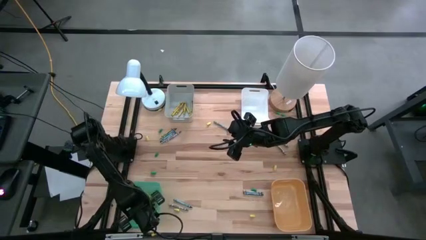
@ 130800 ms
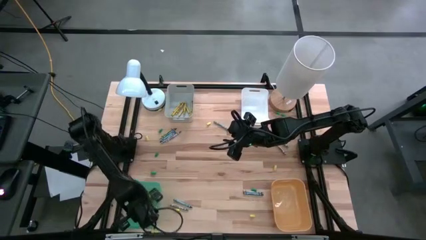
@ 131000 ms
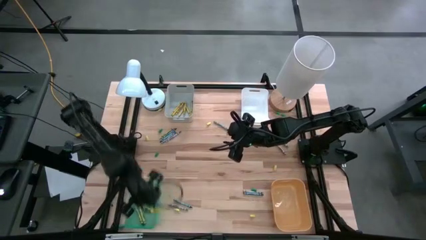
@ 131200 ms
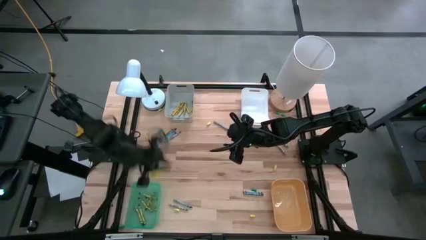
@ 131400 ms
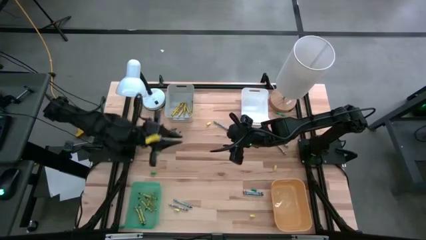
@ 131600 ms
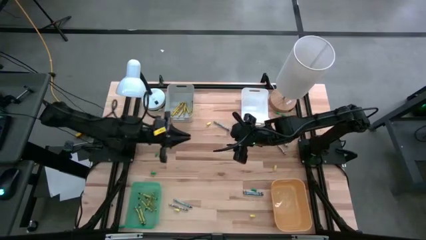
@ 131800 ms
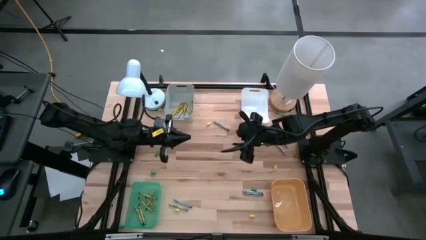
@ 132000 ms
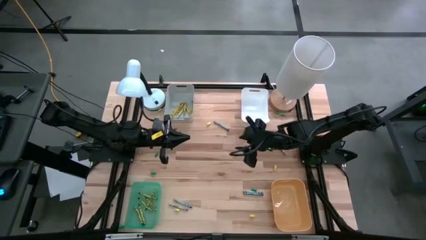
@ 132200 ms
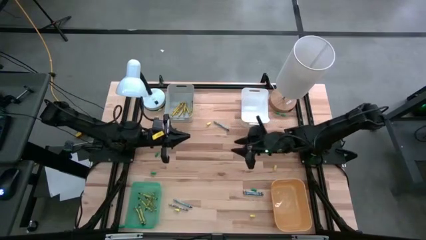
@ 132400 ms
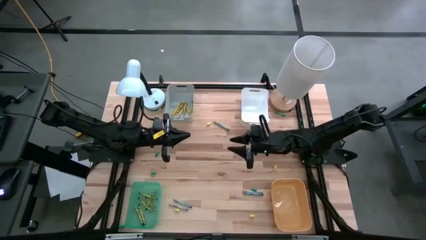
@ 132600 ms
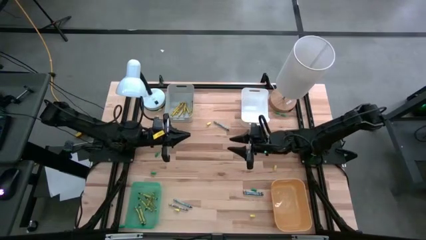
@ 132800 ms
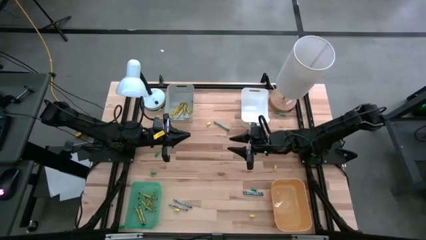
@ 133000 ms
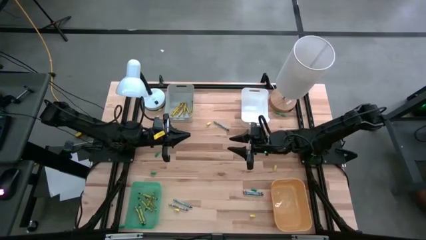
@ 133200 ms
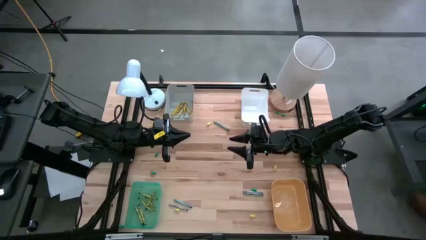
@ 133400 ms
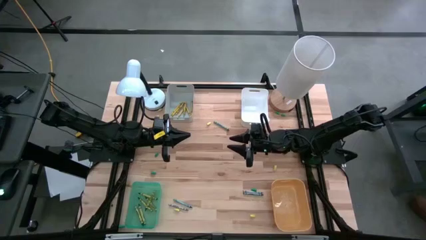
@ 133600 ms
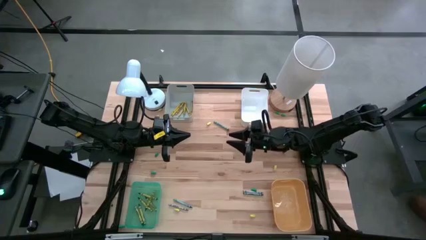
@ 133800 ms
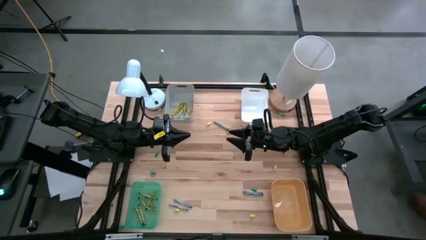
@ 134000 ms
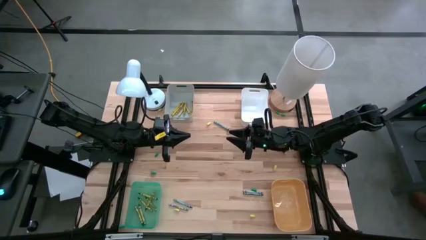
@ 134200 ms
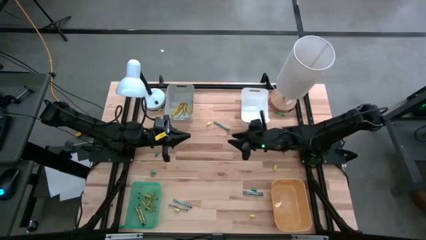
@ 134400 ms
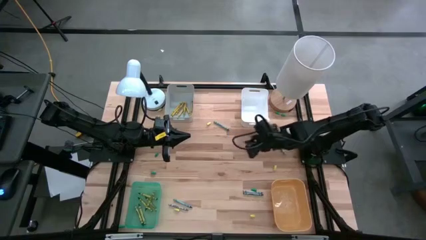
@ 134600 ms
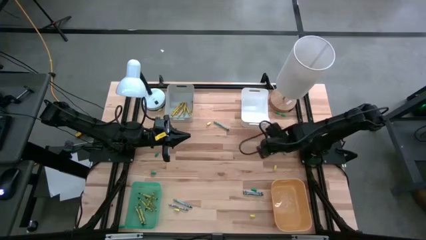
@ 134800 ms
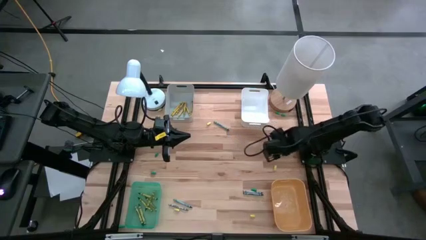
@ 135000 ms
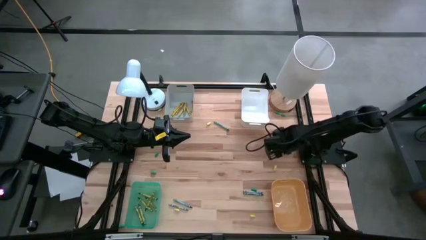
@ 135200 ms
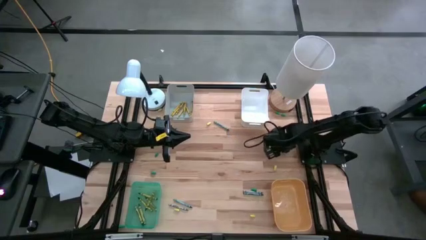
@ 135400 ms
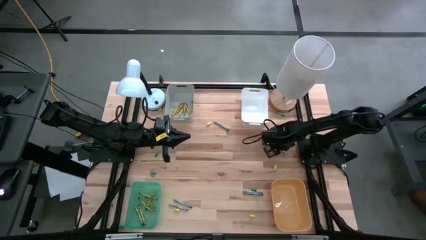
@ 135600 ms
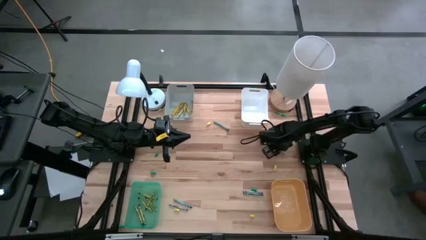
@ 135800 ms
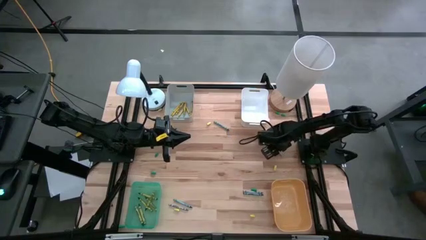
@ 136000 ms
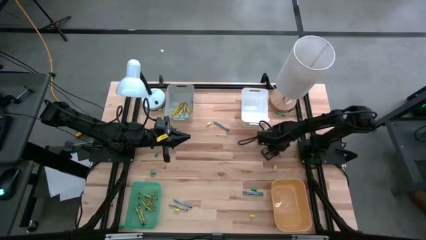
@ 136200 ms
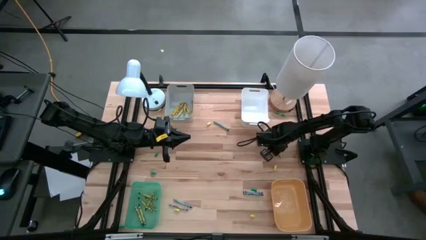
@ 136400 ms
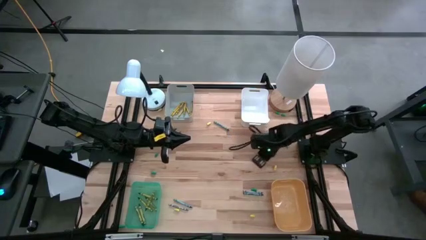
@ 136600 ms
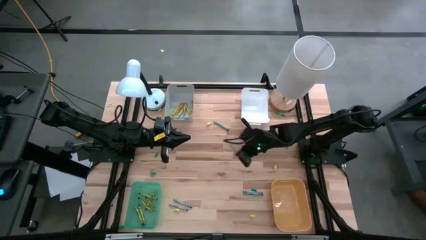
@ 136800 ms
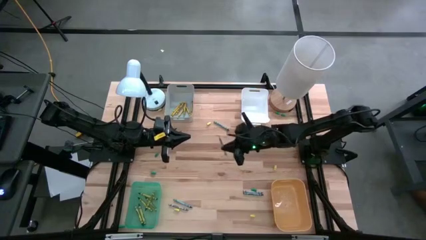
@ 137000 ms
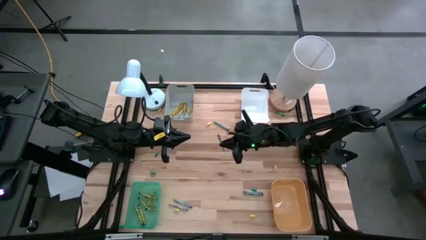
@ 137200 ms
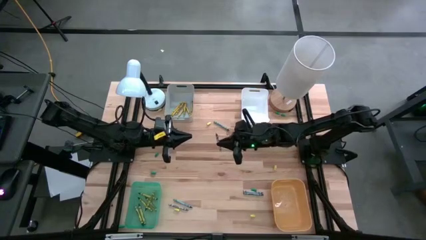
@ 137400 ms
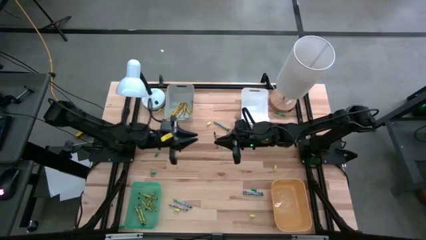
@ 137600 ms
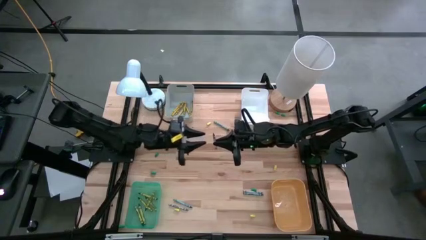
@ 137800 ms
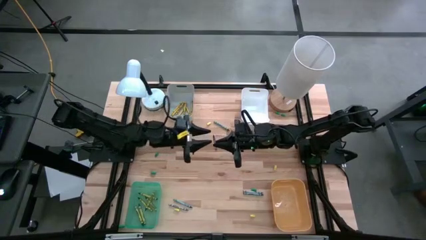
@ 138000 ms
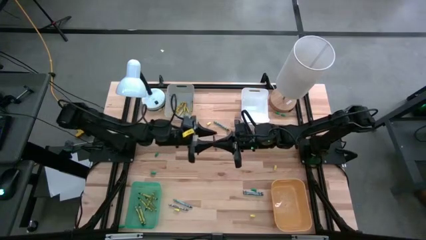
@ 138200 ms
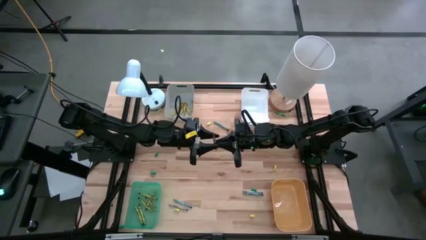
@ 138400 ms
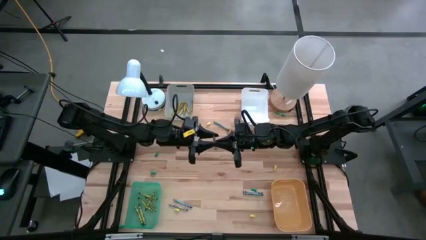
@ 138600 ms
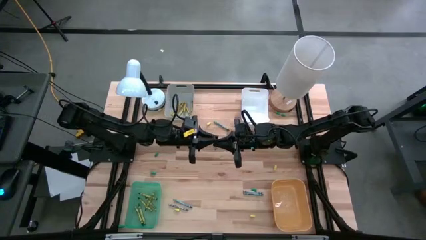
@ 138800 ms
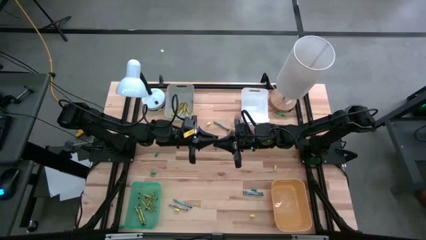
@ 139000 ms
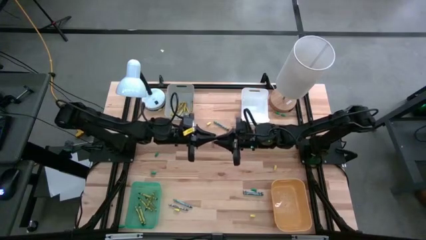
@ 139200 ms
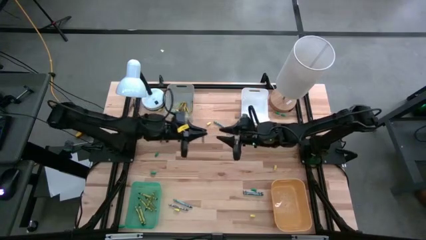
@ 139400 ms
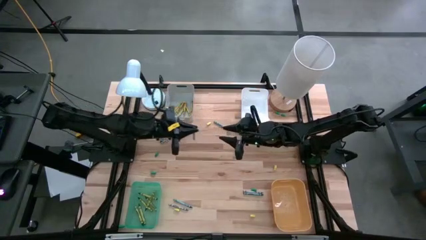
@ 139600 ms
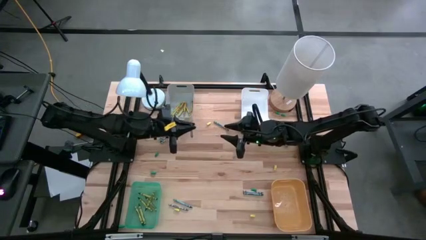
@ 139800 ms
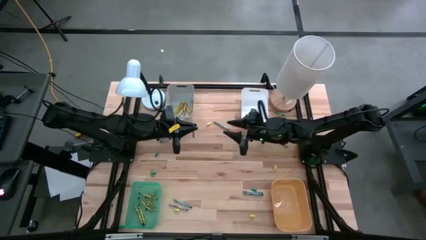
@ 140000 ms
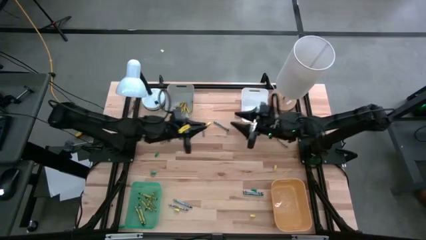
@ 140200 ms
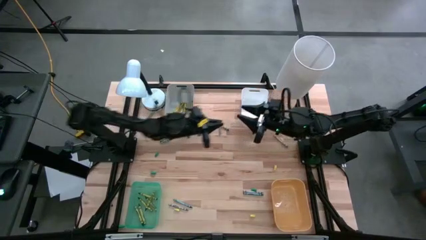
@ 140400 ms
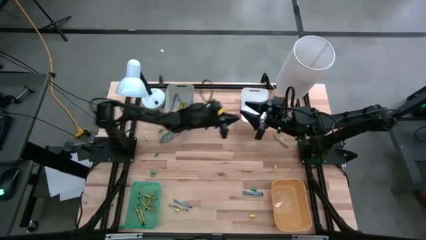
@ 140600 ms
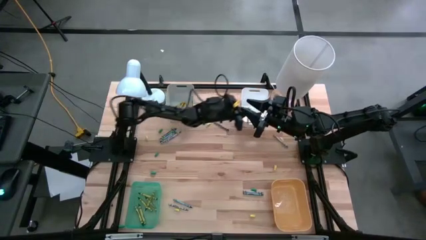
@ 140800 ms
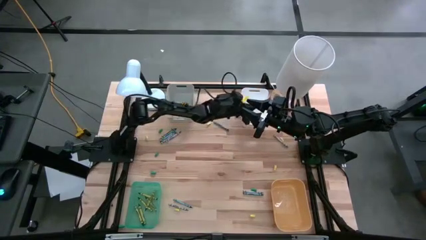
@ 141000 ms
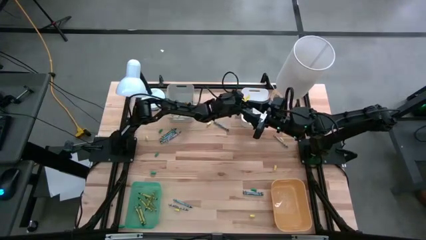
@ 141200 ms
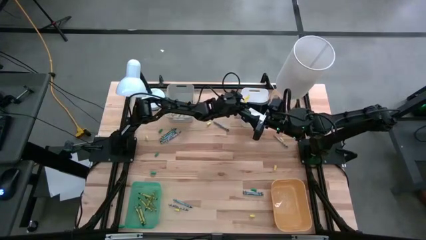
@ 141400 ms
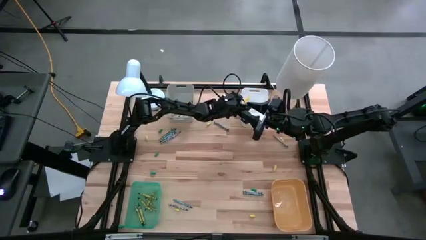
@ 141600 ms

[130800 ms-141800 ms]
Task: Sort crayons
Put the gray crayon into the white bin

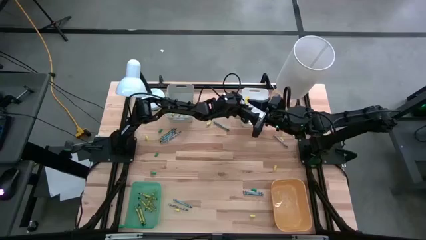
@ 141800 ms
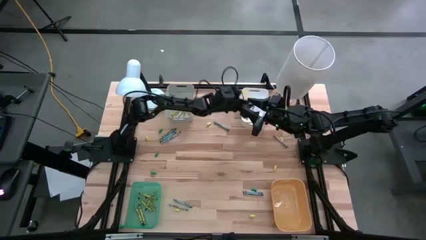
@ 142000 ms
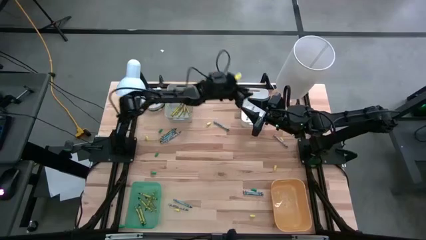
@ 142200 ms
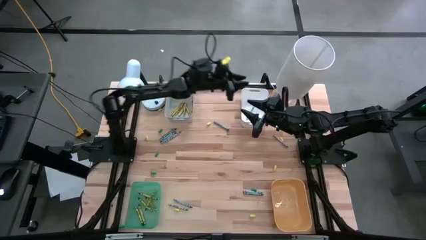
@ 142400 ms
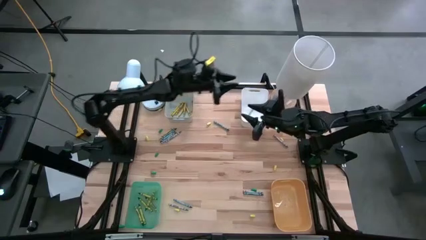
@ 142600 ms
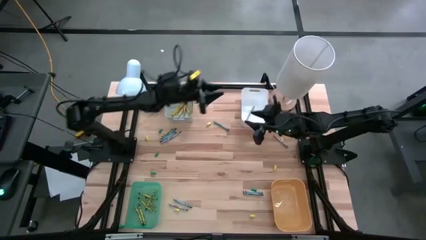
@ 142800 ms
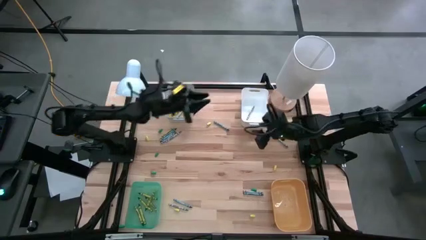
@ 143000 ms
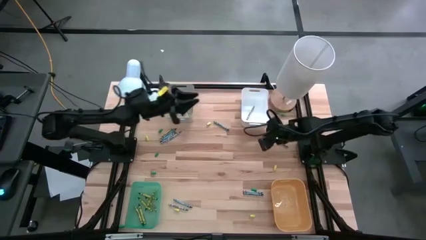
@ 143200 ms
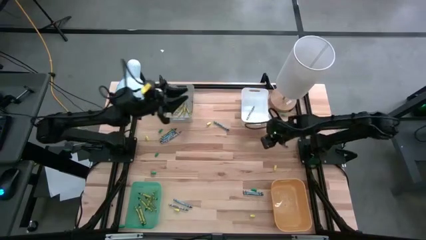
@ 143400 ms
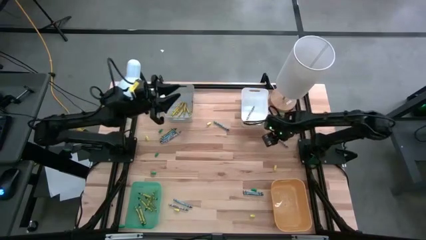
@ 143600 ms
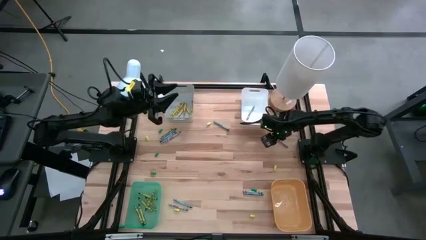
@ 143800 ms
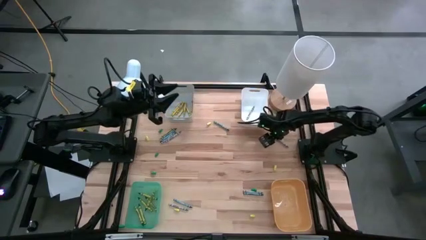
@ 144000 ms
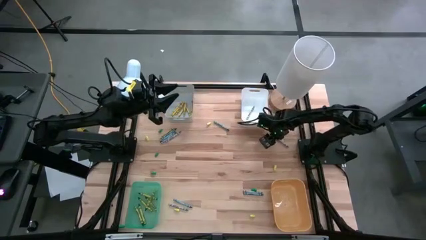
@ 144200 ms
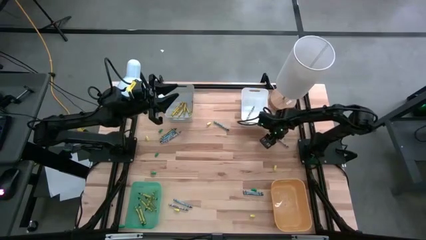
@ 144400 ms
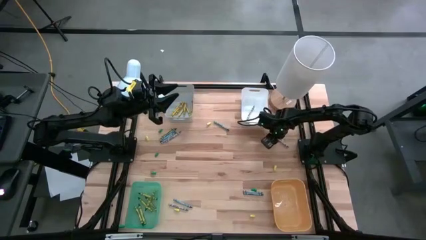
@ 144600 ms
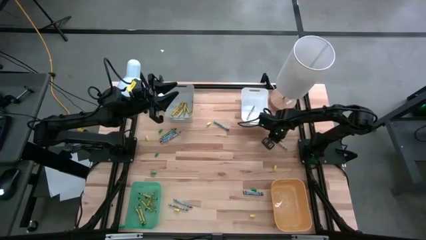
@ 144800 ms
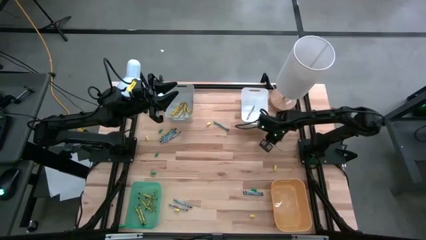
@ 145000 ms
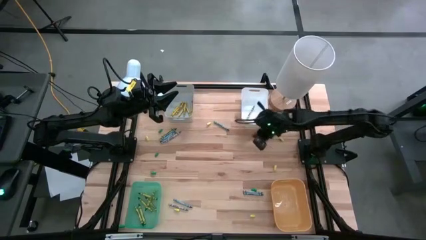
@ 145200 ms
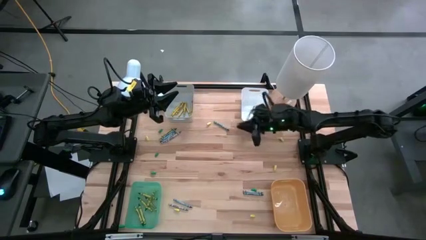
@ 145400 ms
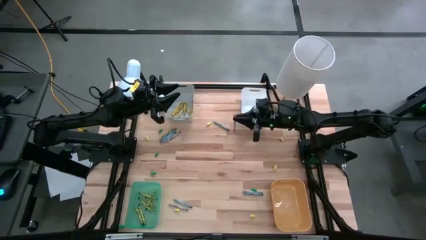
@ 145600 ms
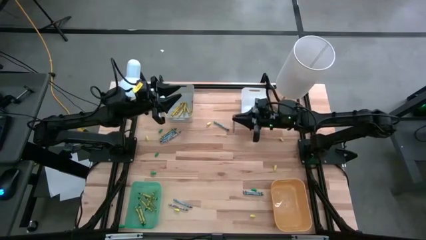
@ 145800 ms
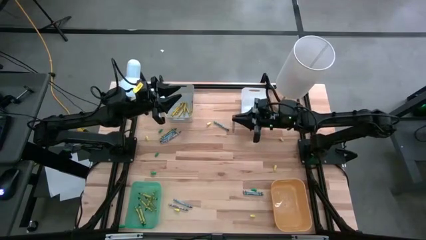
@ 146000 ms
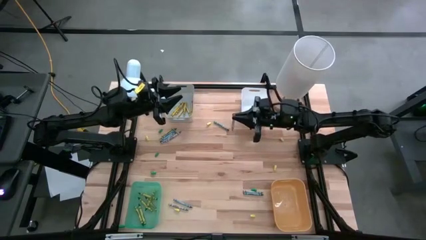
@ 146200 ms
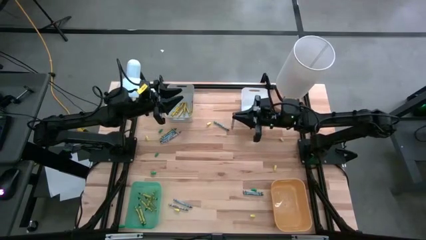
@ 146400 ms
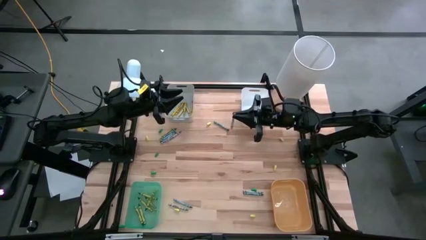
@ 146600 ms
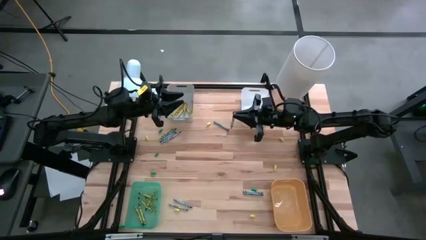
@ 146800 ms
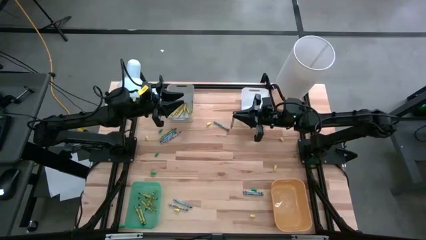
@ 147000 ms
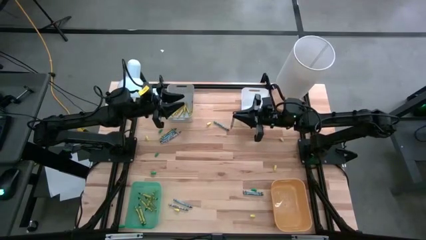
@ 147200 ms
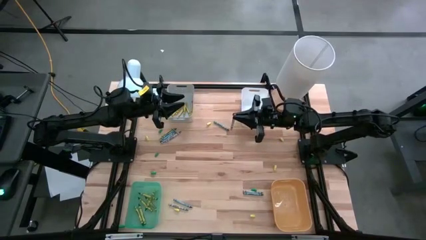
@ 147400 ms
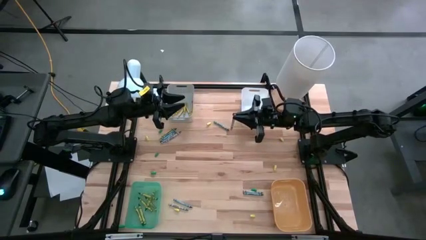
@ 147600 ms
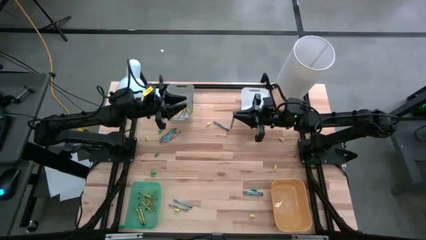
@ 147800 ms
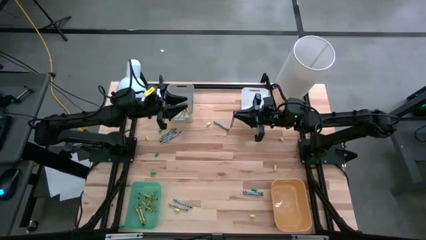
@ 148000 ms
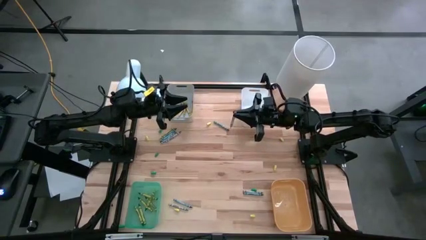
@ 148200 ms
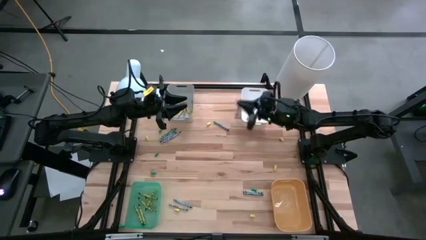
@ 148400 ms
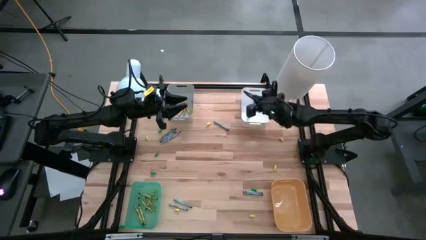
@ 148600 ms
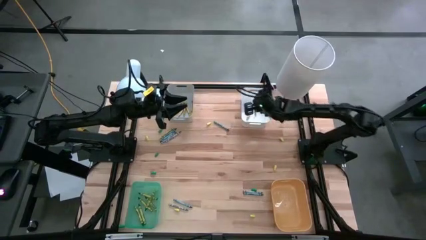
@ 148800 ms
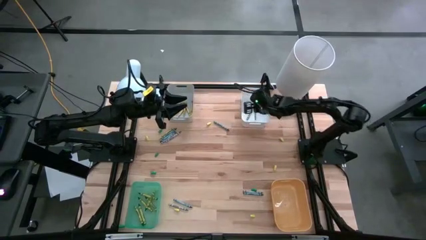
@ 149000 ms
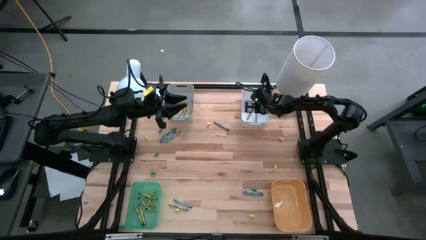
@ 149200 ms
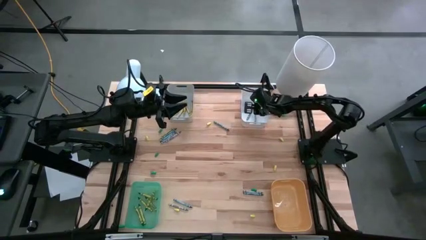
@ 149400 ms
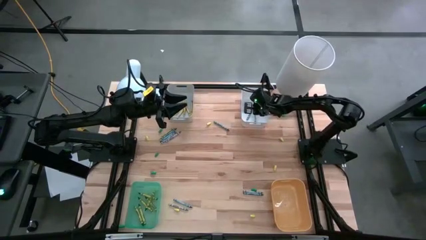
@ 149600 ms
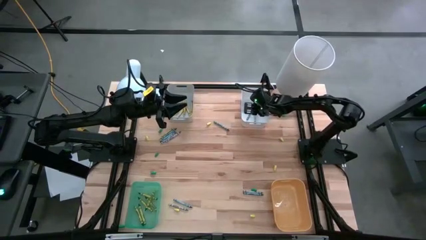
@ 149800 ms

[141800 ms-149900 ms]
Put the gray crayon into the white bin
